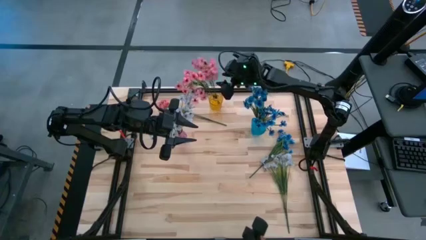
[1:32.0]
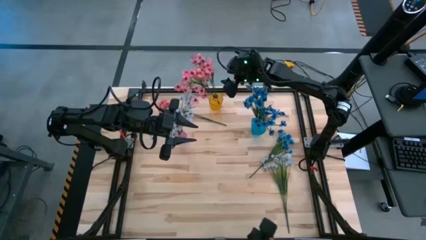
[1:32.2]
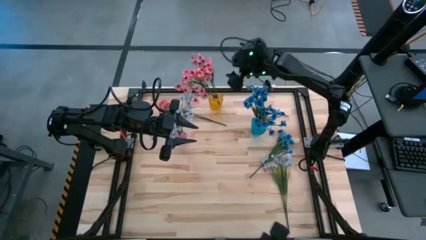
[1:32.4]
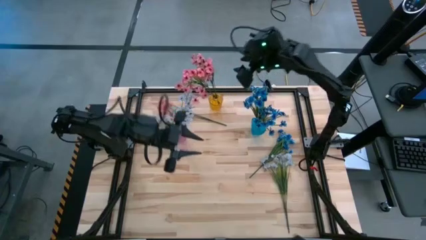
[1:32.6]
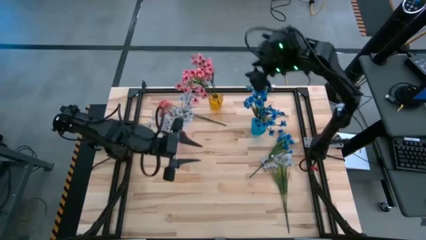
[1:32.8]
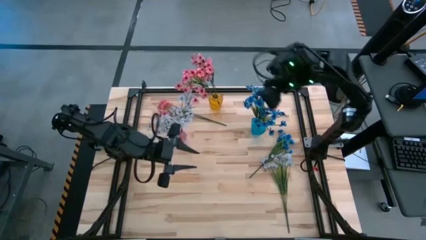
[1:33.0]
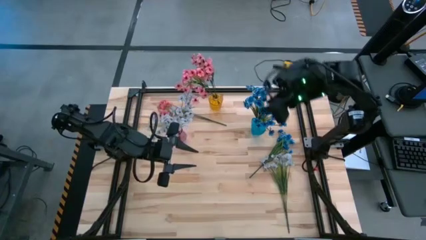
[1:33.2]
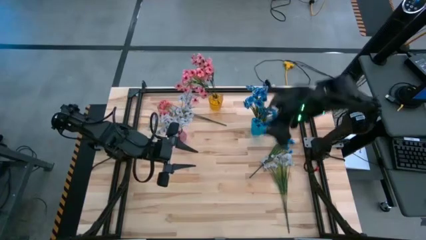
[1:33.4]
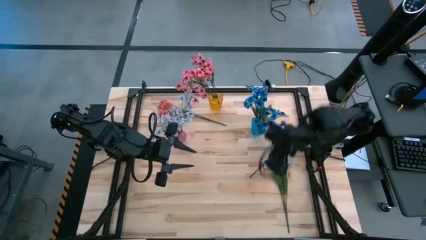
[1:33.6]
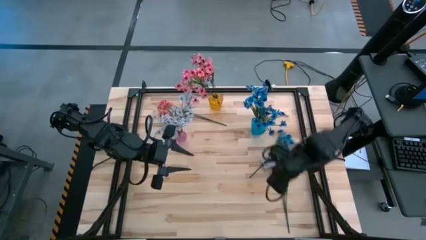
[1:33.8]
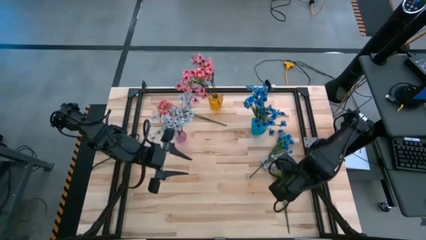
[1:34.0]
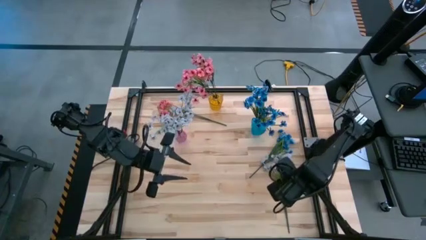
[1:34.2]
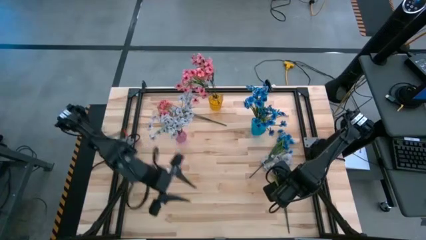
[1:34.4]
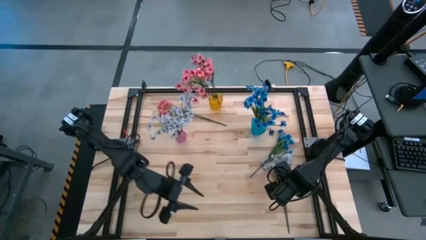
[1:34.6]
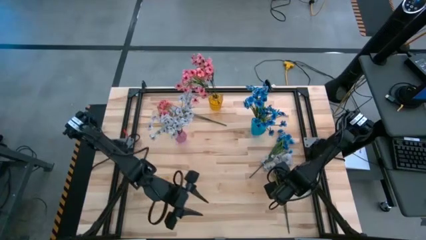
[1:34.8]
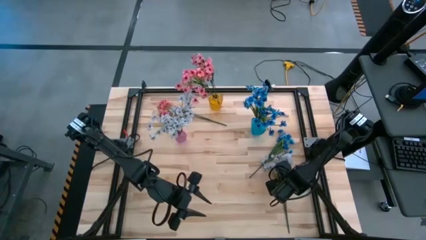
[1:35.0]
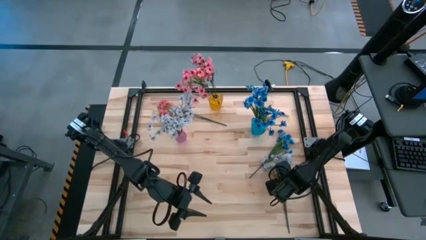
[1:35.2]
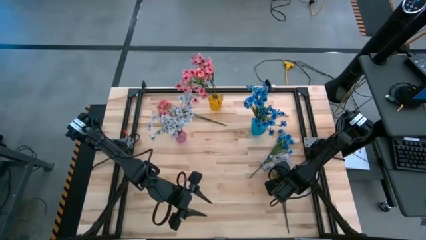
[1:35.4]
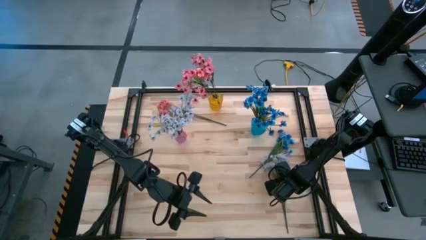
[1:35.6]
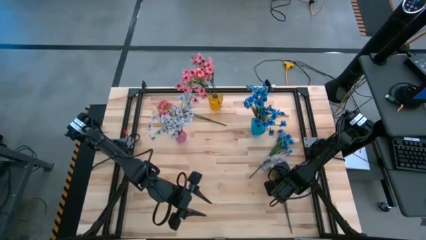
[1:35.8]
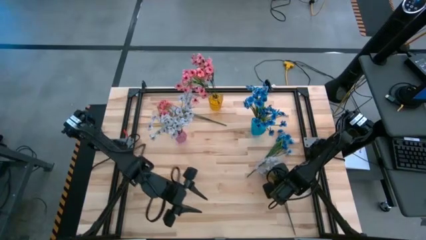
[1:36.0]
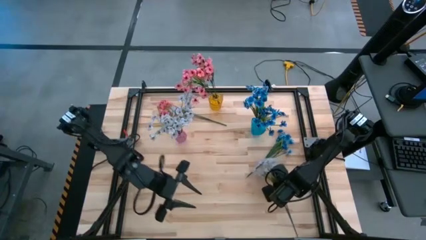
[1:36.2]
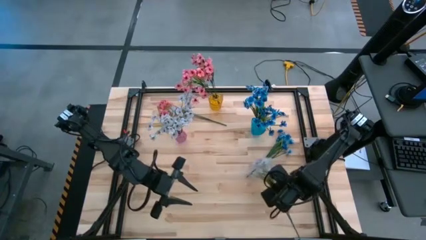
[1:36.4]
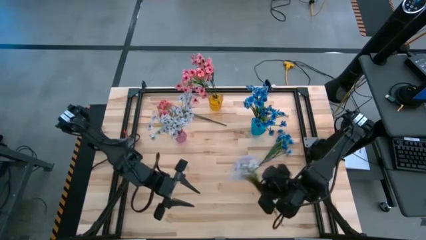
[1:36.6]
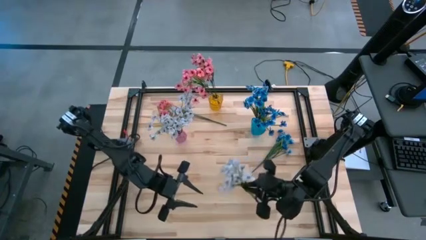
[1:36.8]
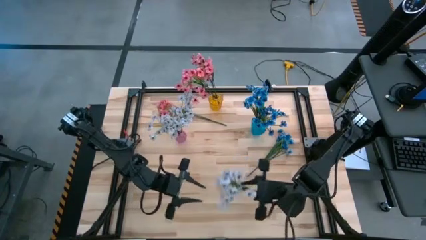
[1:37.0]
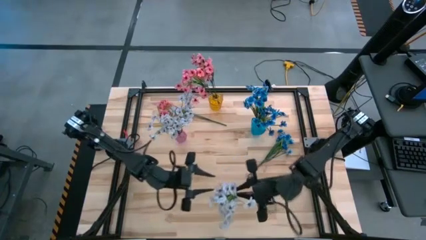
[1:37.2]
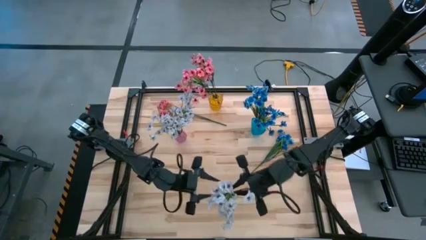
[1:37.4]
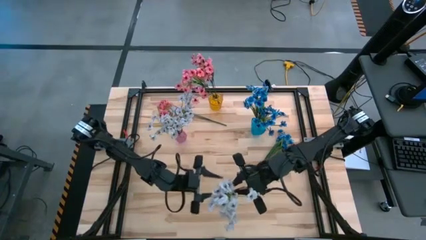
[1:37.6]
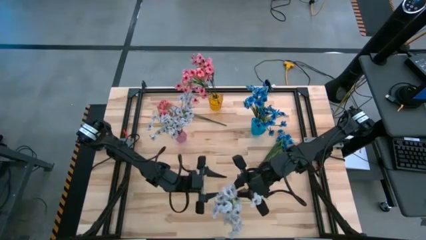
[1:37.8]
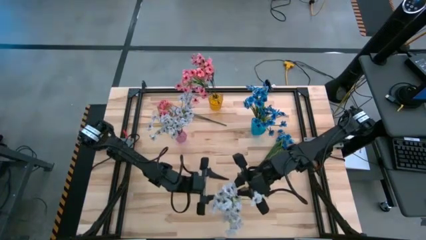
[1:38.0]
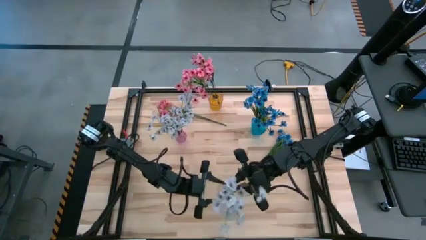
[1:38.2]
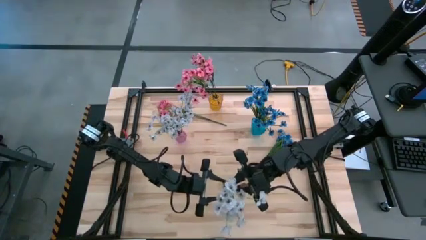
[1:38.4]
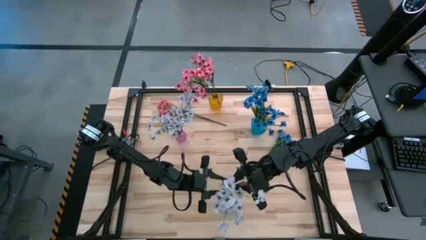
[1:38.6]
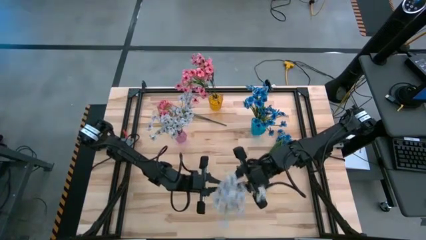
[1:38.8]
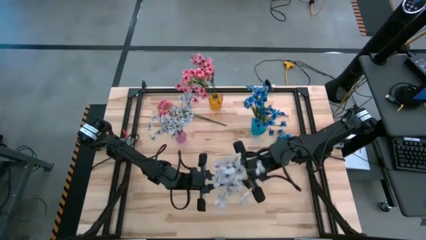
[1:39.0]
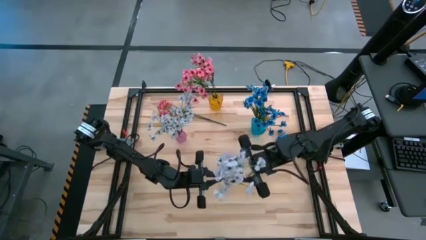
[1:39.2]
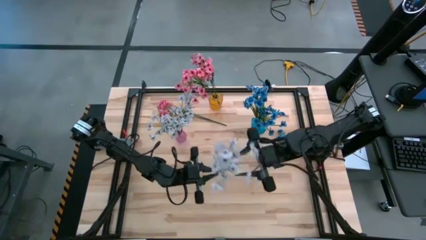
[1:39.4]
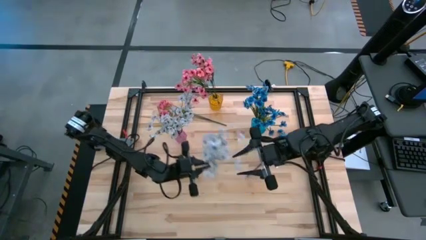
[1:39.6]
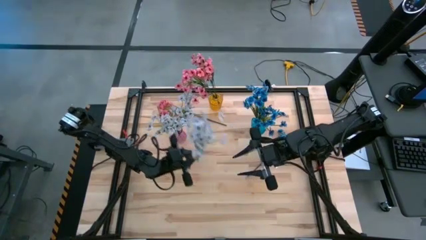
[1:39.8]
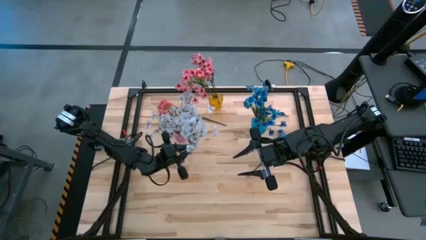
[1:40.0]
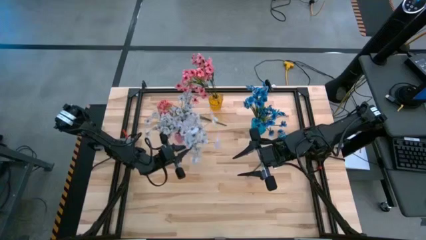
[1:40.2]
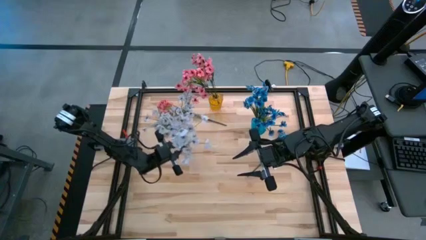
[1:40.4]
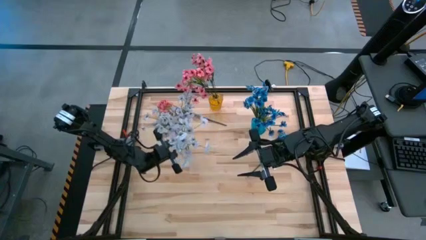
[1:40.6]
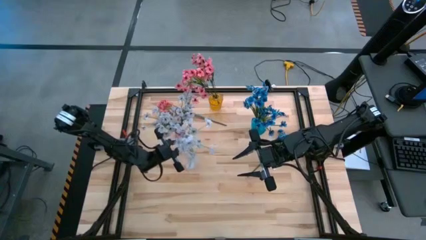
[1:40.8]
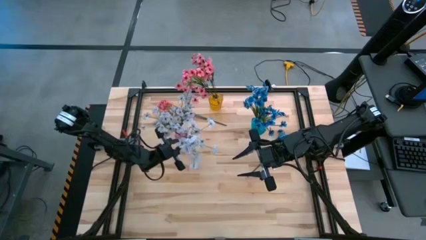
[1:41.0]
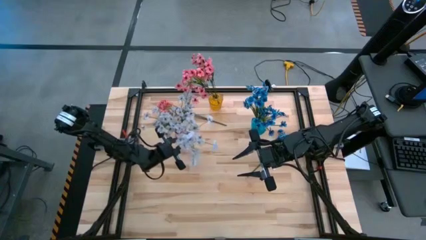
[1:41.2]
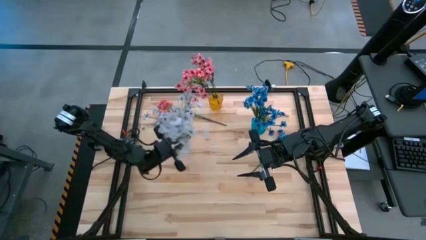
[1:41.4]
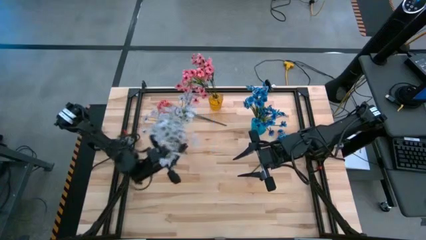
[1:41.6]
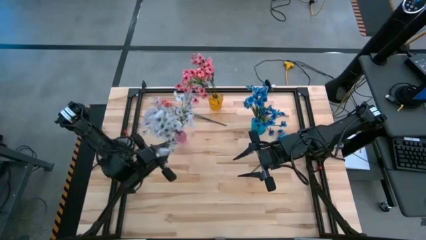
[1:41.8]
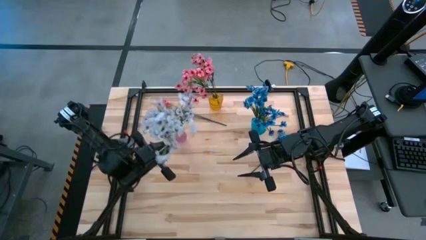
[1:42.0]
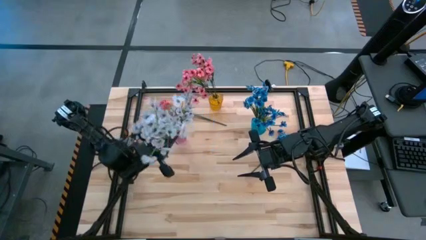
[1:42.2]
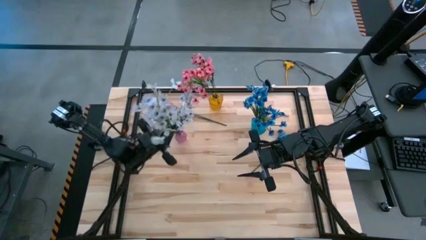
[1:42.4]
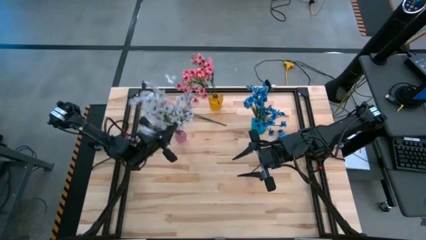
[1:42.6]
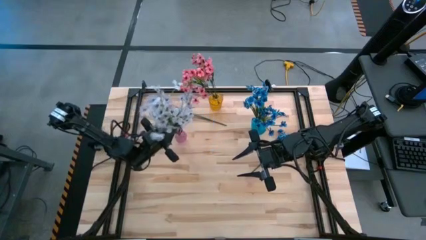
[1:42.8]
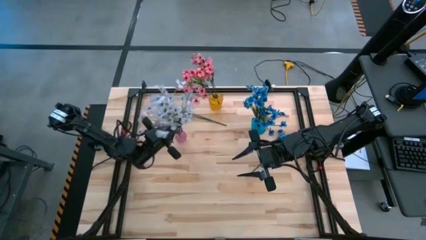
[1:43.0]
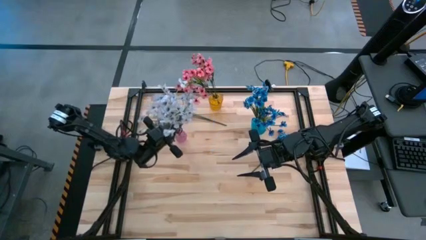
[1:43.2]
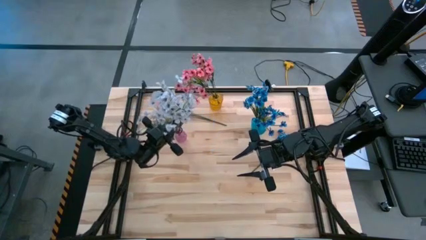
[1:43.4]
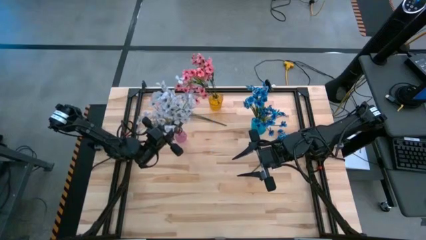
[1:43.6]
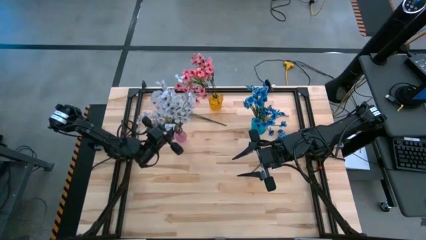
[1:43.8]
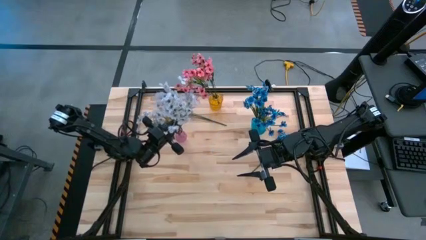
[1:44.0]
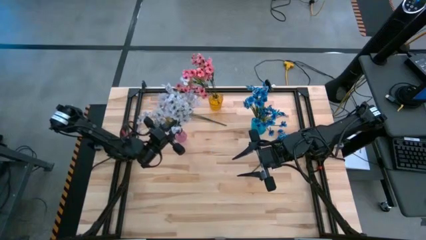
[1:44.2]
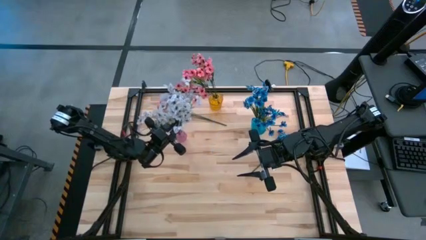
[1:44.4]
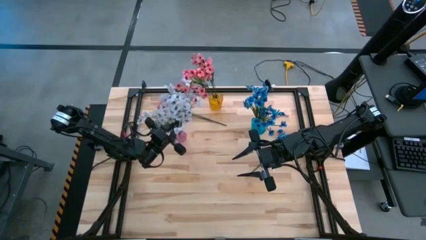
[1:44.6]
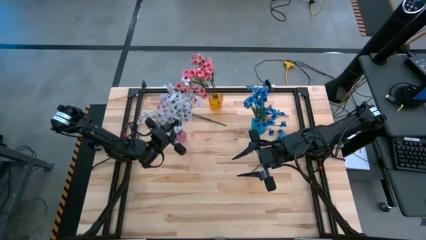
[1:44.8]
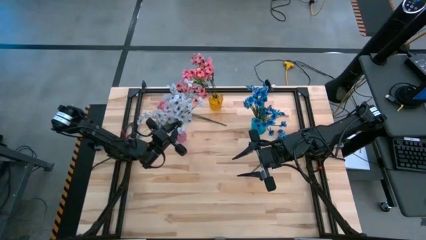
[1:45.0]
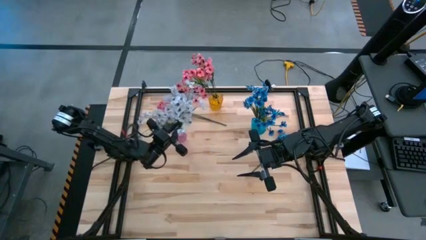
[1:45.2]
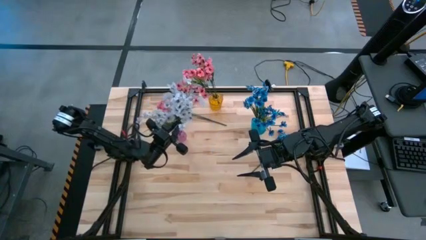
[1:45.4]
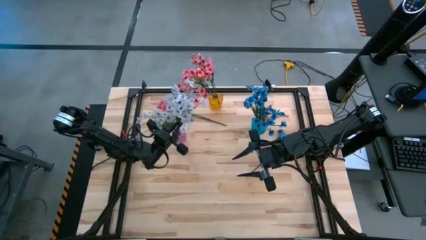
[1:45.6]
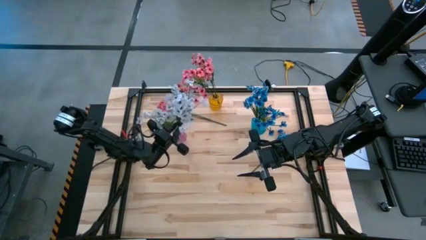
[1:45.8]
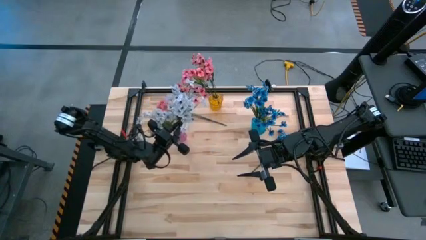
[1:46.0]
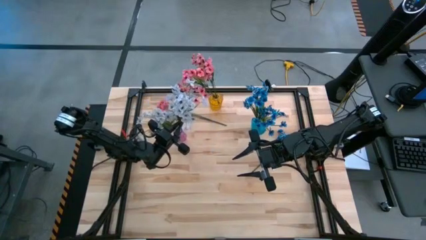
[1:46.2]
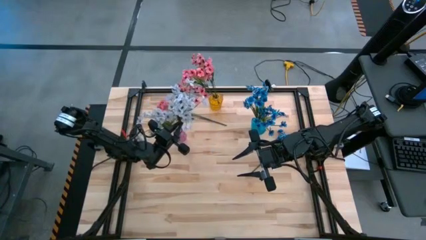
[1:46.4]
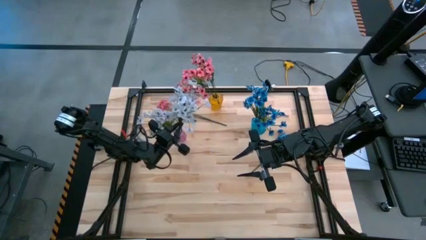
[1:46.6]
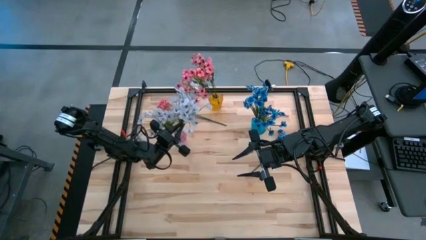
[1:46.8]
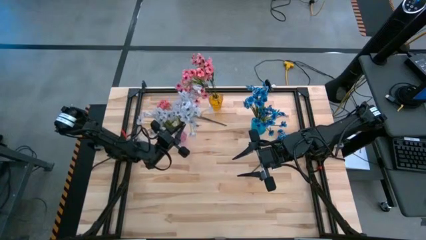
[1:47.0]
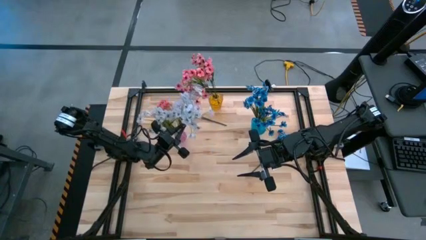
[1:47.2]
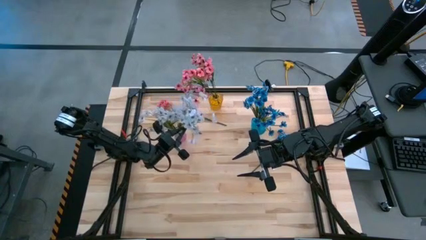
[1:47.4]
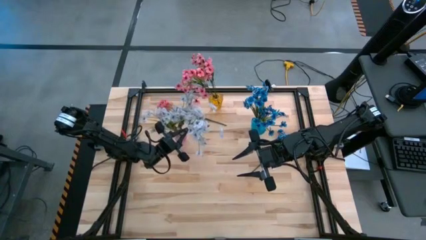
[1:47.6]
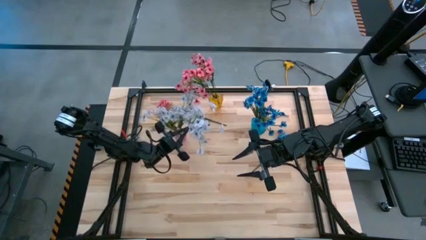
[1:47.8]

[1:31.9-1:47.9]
Task: Sort flowers into vase by color
Put the white flowers into the purple vase
